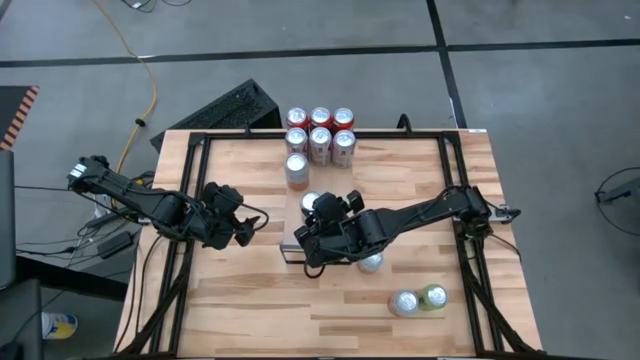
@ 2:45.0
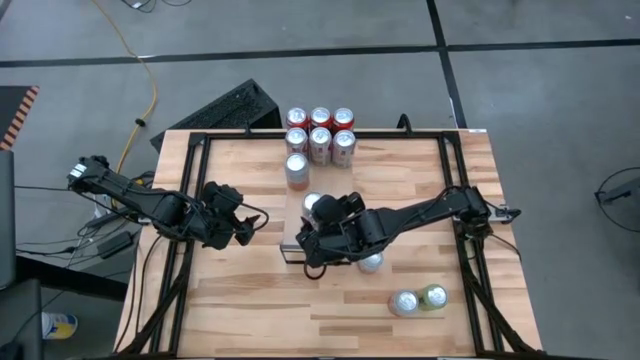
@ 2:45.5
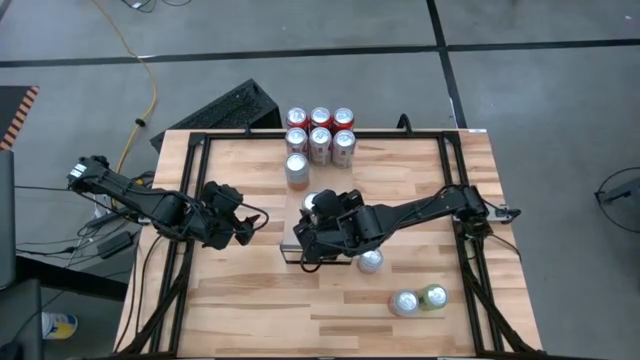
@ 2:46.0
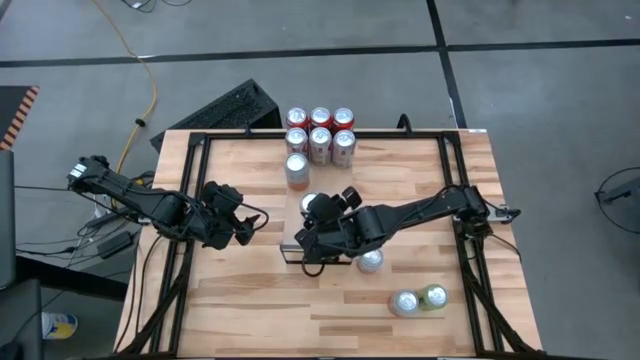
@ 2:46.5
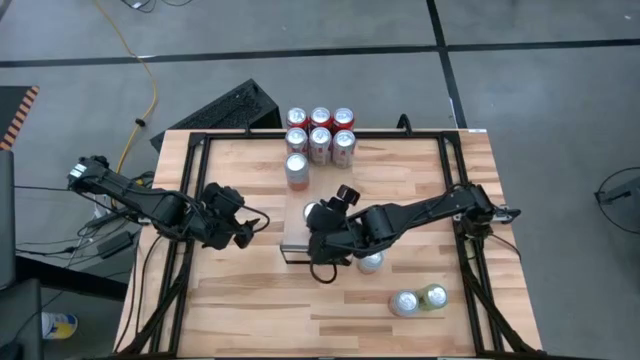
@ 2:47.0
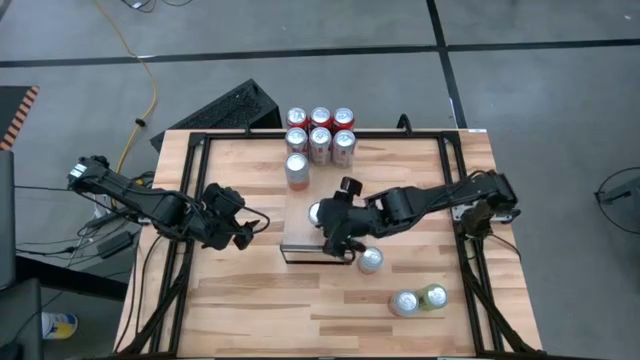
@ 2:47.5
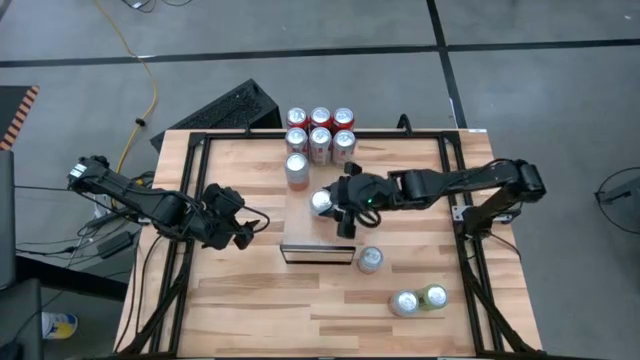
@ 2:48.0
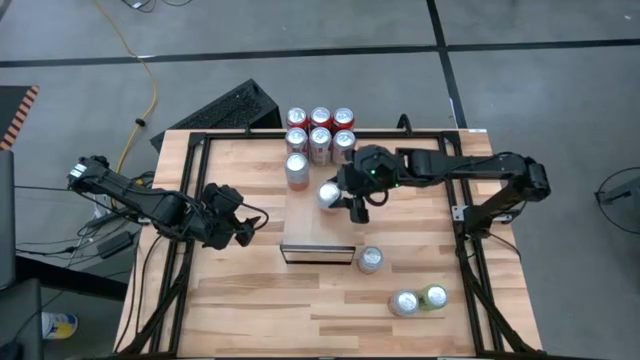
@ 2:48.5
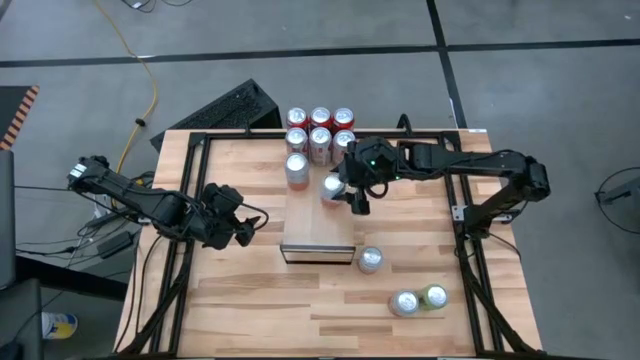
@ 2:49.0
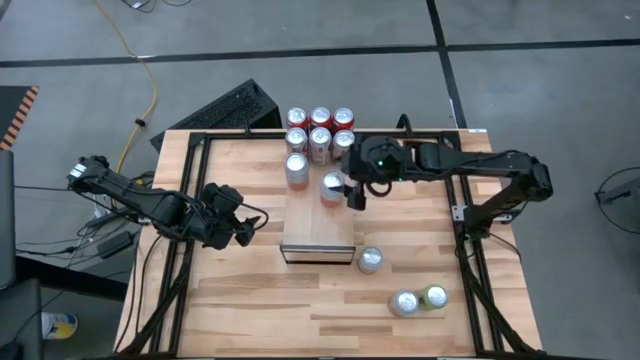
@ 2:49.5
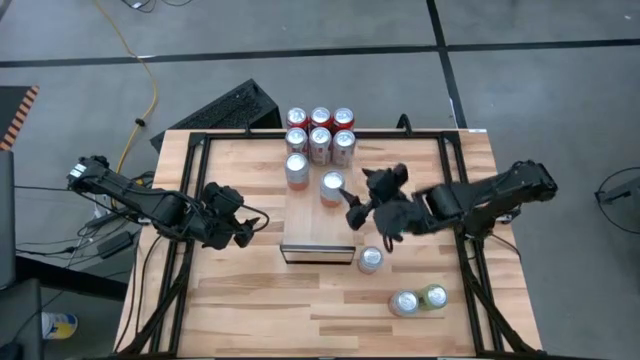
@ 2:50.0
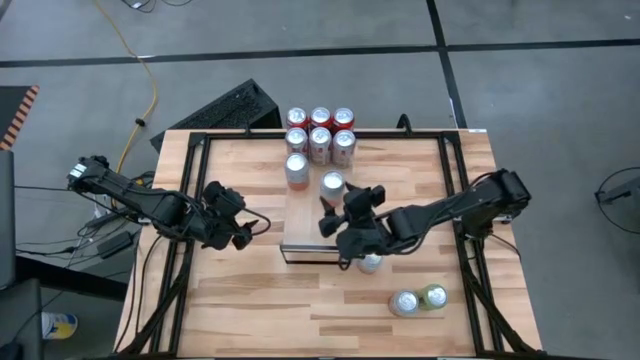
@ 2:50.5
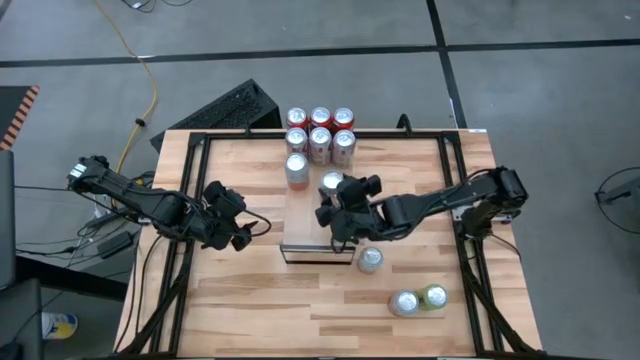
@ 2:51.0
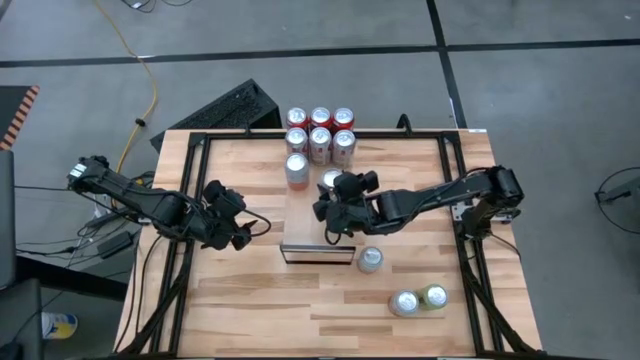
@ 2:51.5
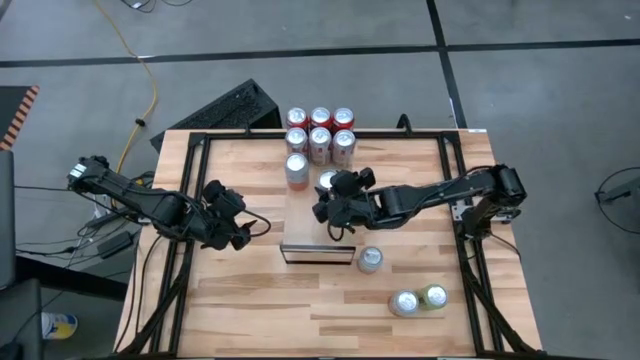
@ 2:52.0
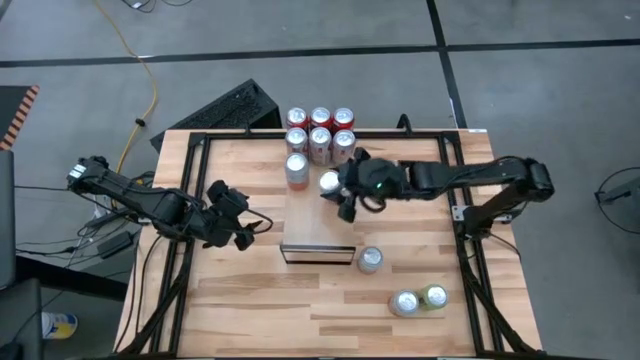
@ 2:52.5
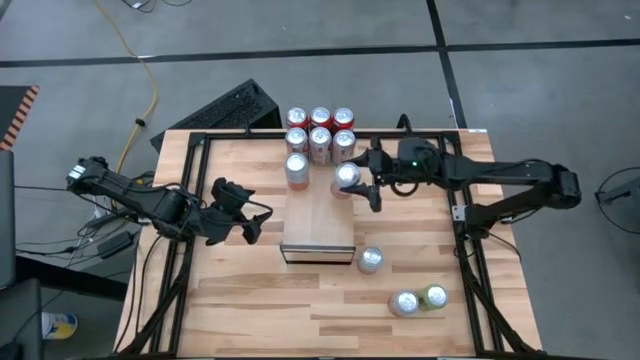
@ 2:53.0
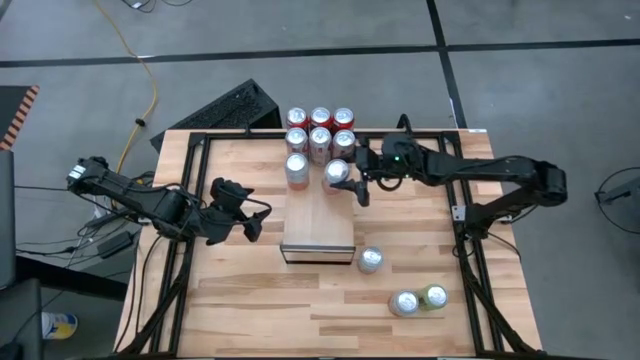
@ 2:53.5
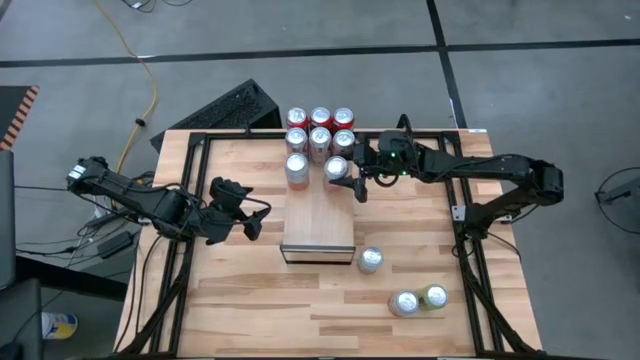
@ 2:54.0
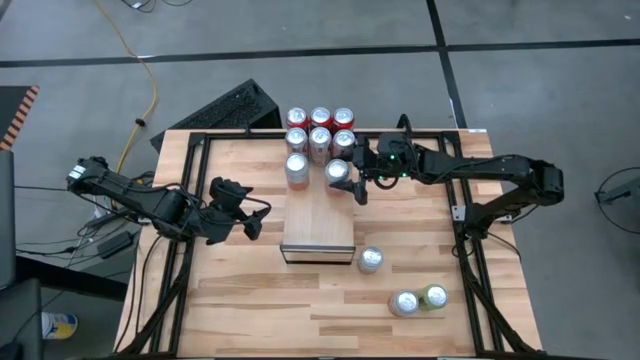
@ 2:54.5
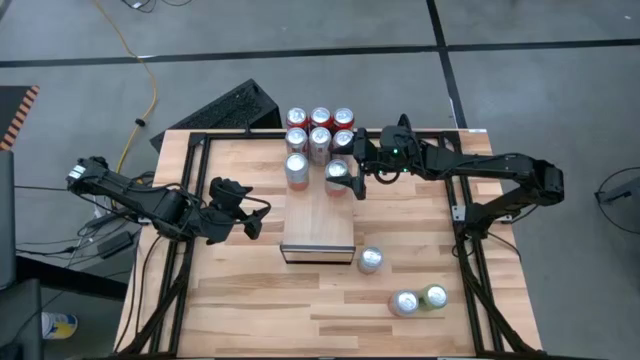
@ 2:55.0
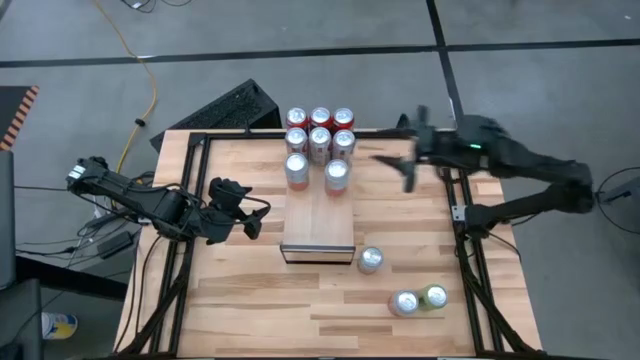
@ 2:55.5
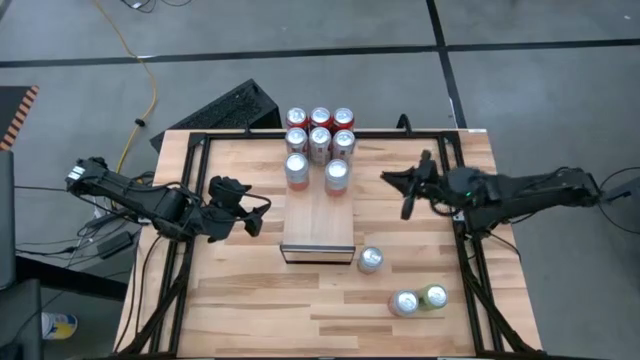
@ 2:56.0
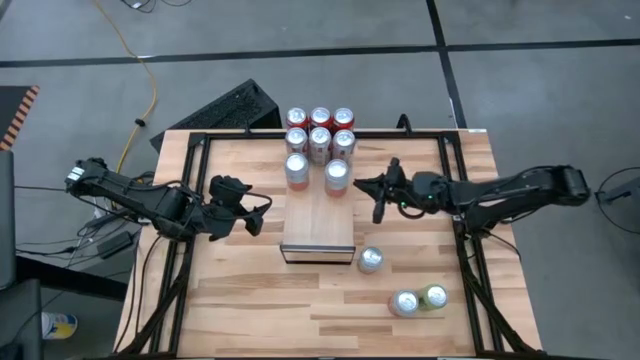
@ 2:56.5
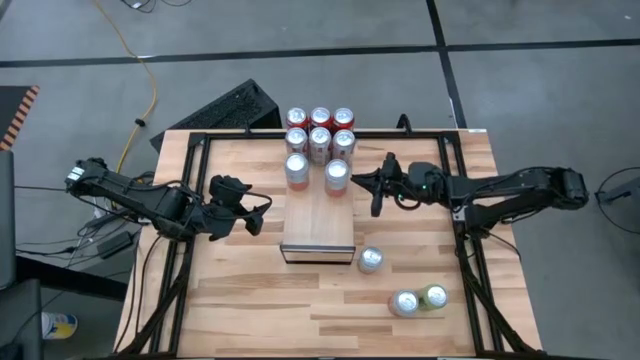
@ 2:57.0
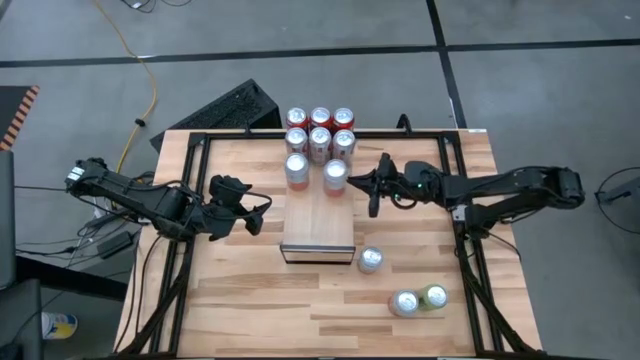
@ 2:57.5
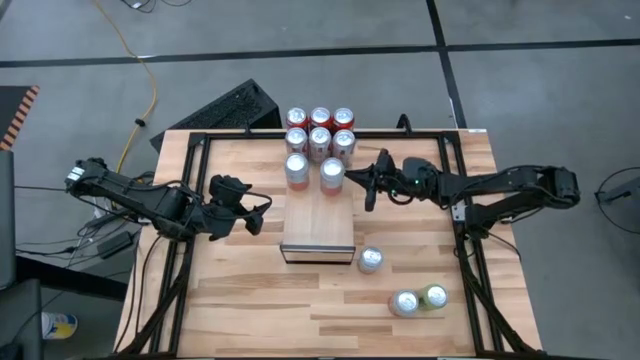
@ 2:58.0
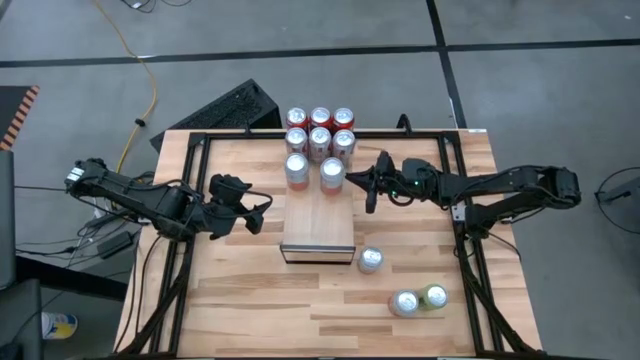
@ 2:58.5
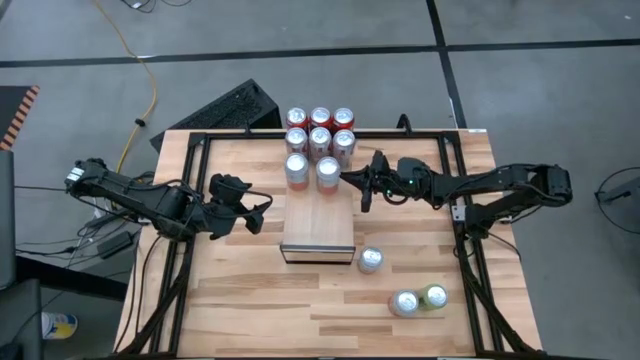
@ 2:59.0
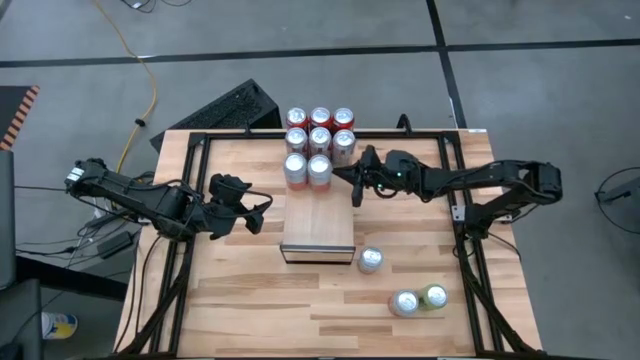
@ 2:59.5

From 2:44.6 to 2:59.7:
Task: Place canned beverage on shelf
Put the left orange-white soda can on the shelf aligned with the other orange-white soda can

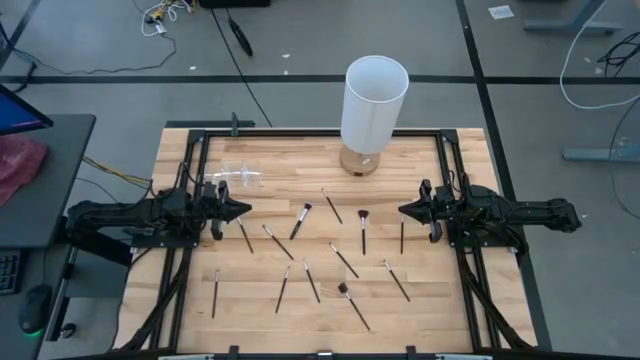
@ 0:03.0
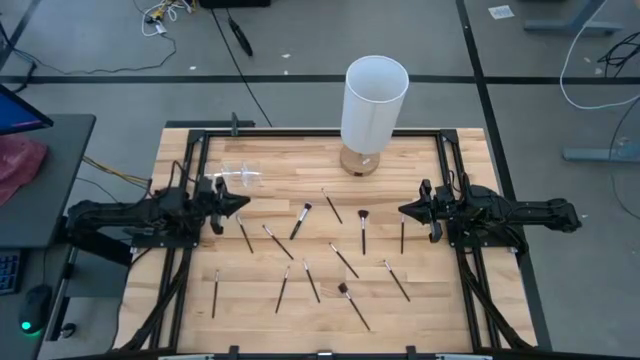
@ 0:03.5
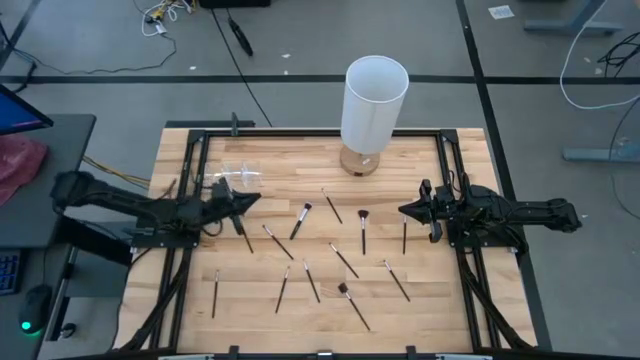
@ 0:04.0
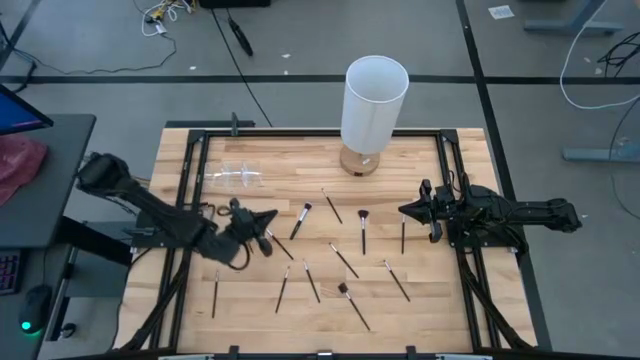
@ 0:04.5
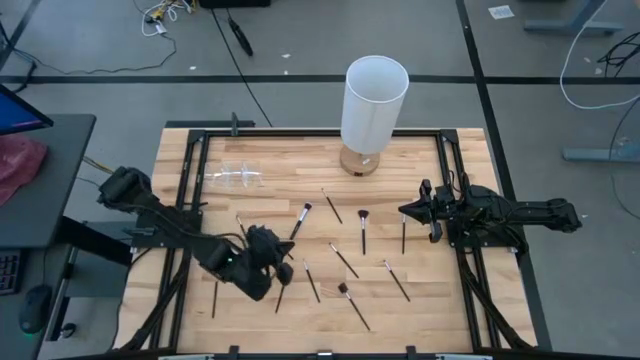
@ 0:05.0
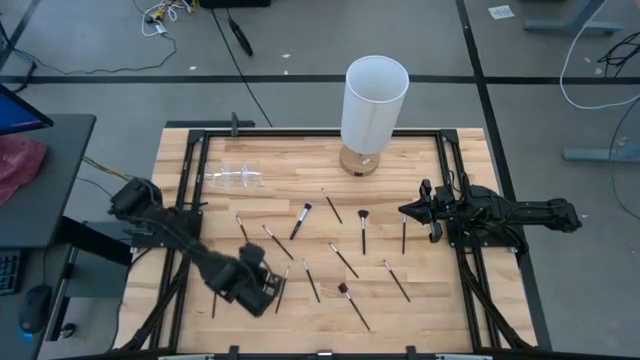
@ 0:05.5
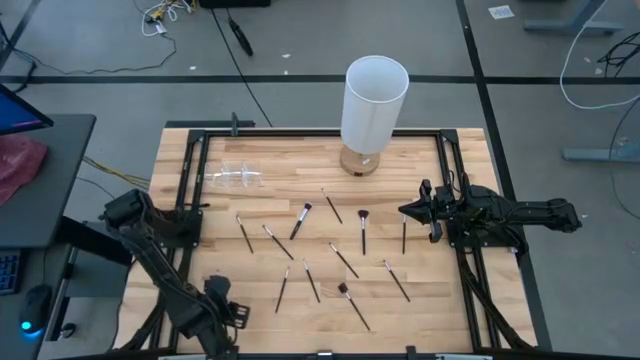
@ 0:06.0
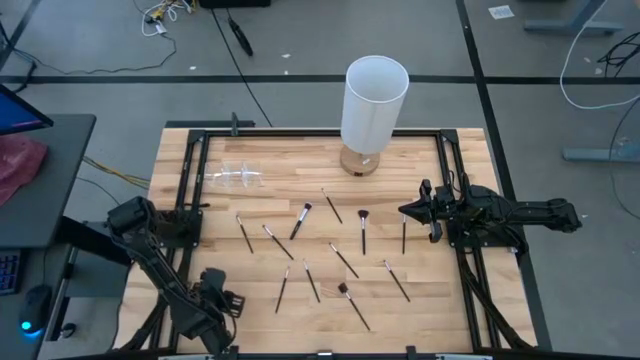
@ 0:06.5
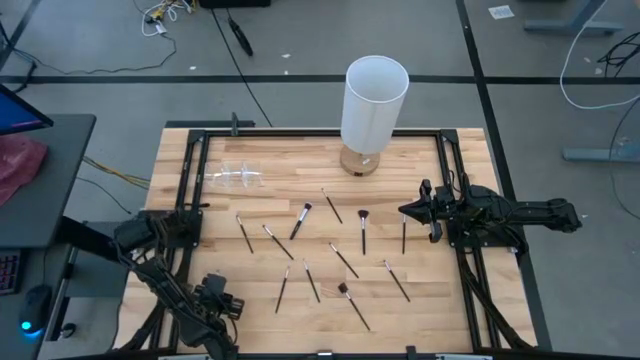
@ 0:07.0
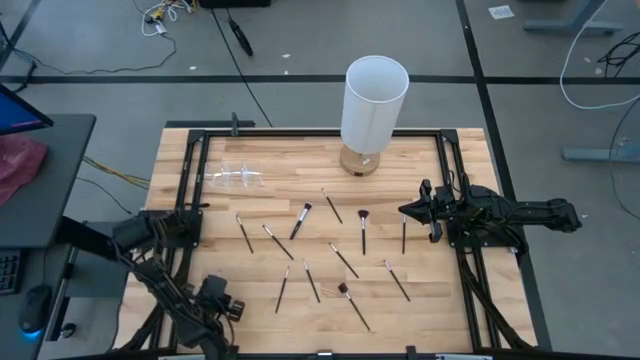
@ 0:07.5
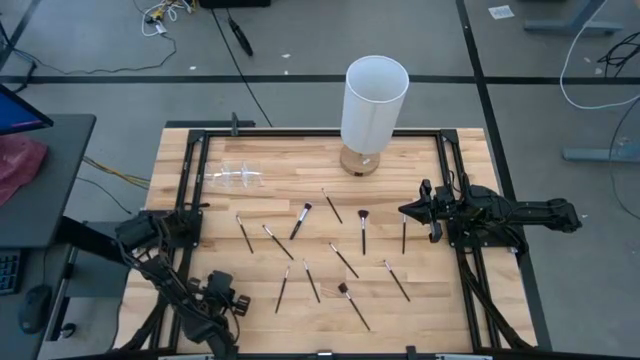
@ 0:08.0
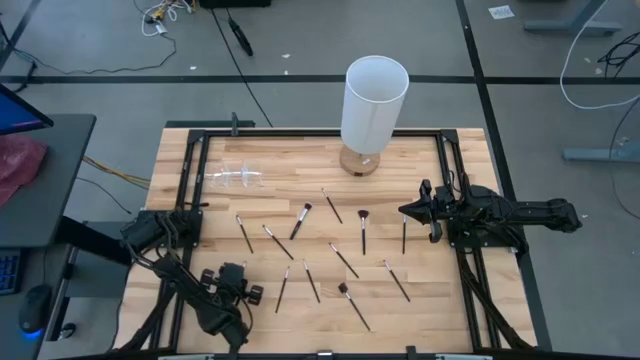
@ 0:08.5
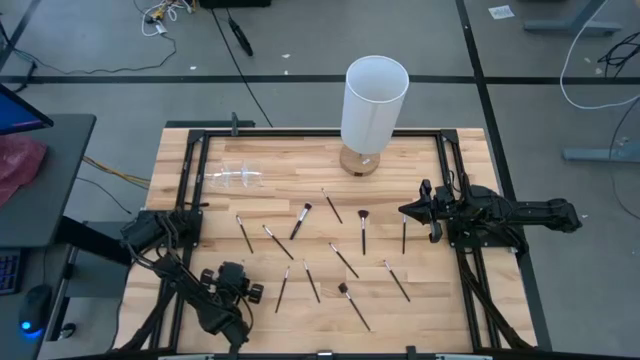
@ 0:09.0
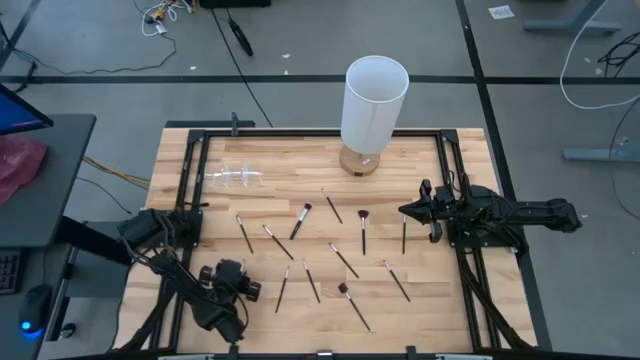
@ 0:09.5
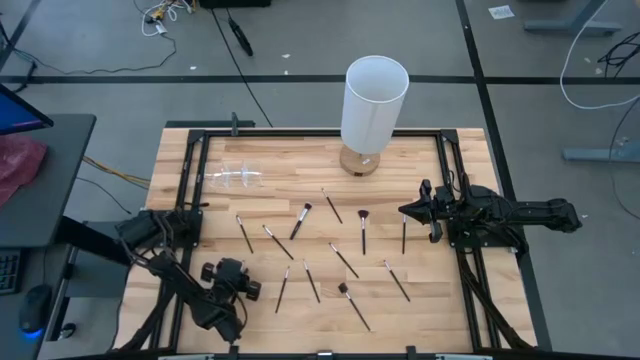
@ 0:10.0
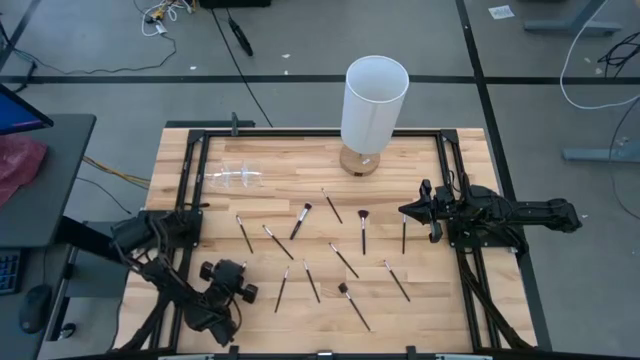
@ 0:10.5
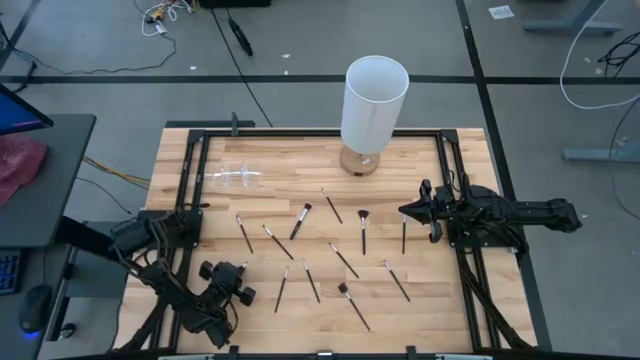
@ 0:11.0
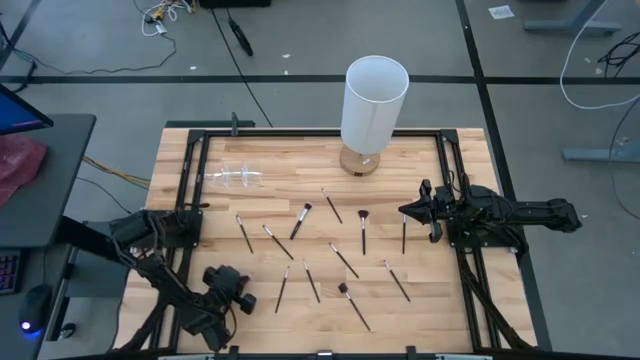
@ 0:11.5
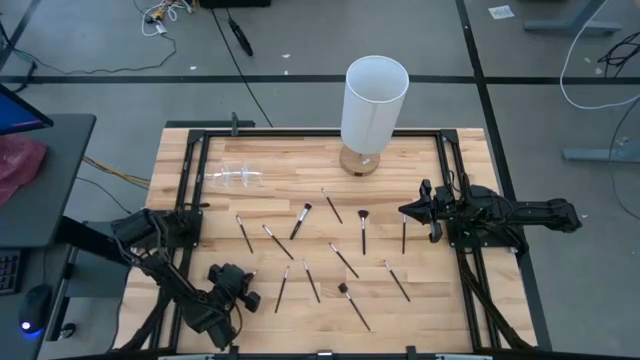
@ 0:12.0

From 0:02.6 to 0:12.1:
Task: Put items in baskets/containers
Put the black eyeshadow brush into the transparent organizer
